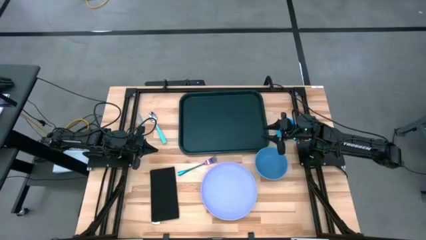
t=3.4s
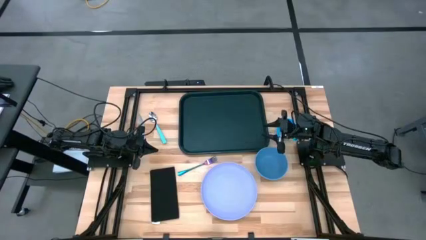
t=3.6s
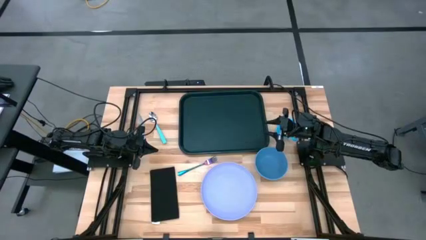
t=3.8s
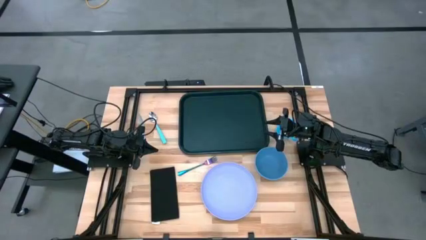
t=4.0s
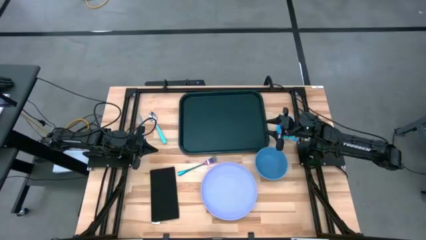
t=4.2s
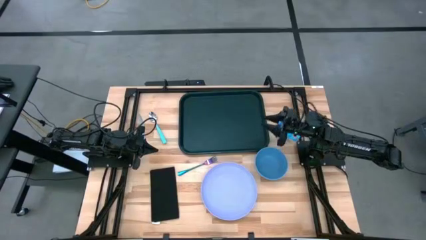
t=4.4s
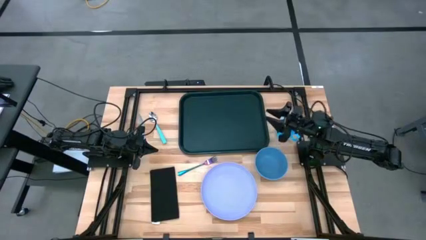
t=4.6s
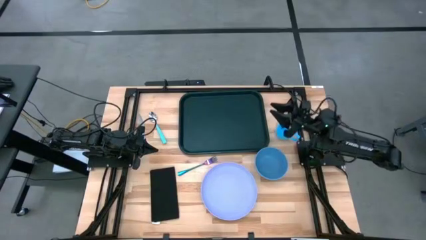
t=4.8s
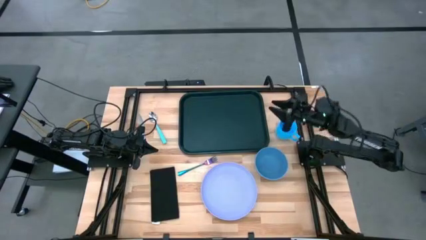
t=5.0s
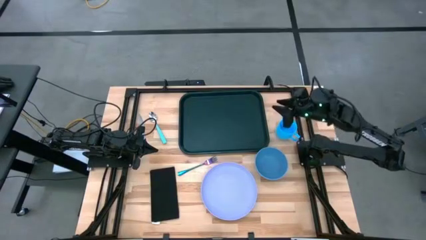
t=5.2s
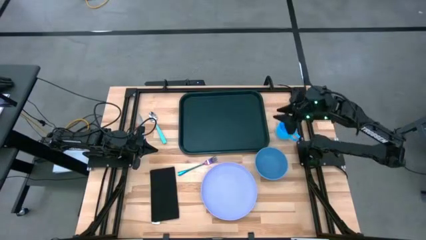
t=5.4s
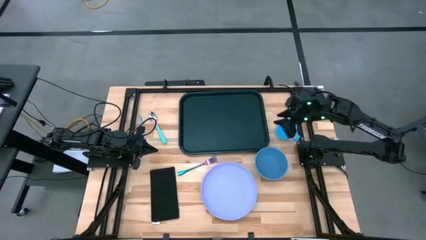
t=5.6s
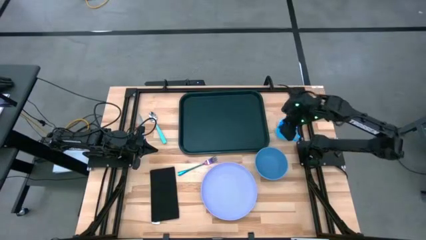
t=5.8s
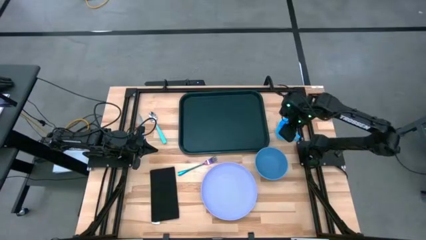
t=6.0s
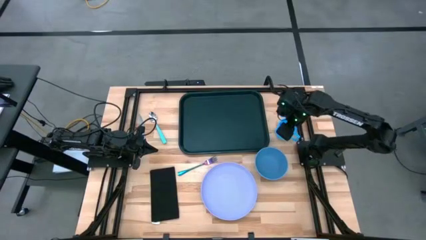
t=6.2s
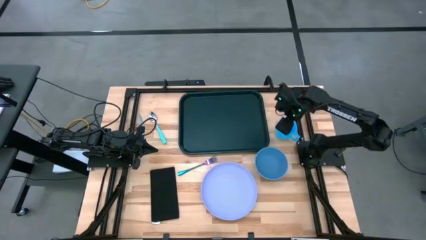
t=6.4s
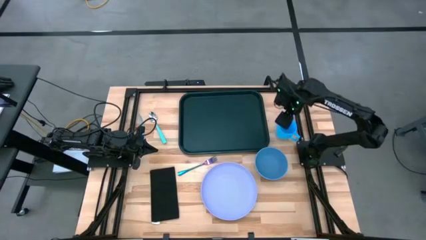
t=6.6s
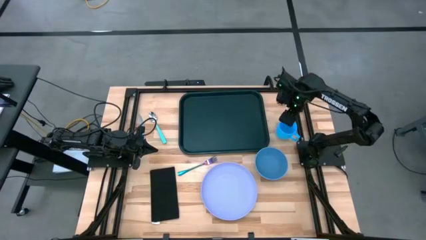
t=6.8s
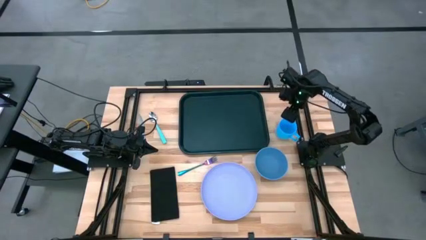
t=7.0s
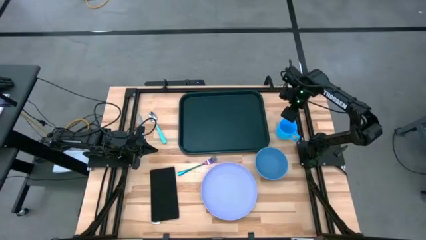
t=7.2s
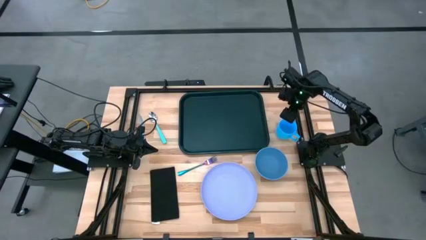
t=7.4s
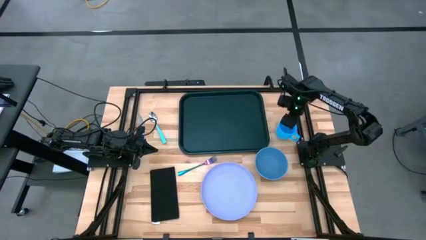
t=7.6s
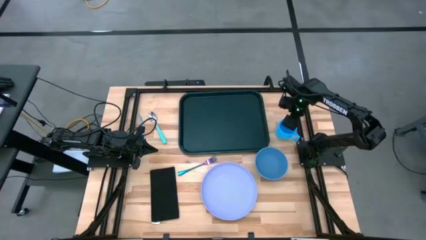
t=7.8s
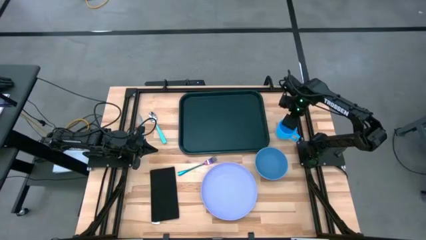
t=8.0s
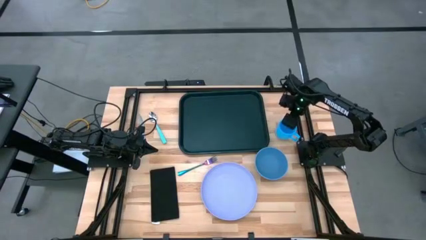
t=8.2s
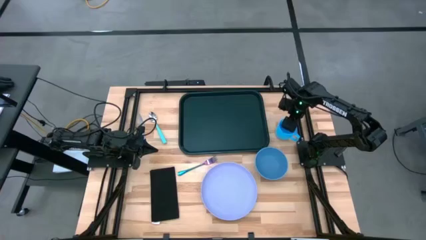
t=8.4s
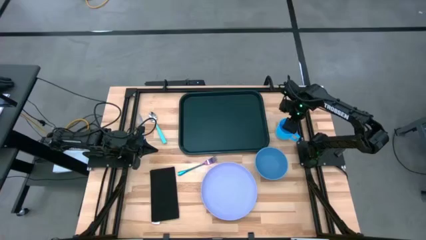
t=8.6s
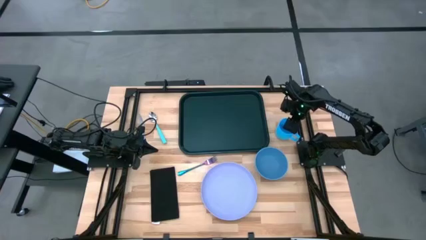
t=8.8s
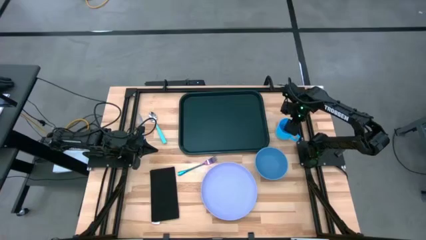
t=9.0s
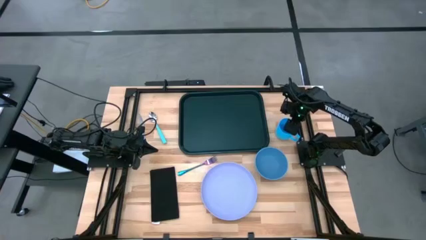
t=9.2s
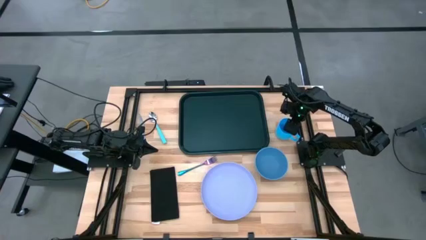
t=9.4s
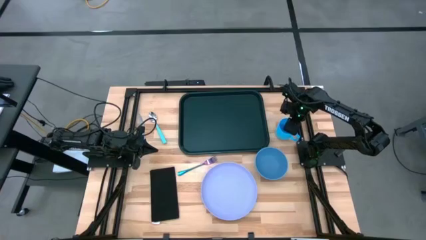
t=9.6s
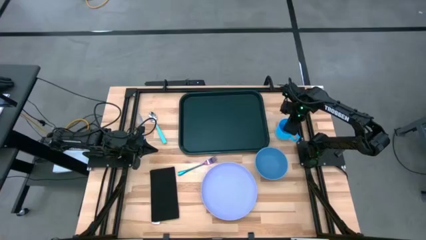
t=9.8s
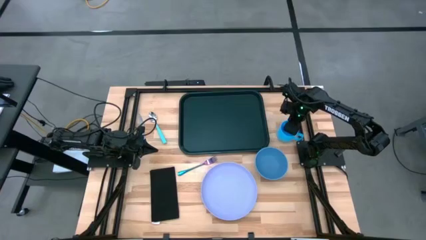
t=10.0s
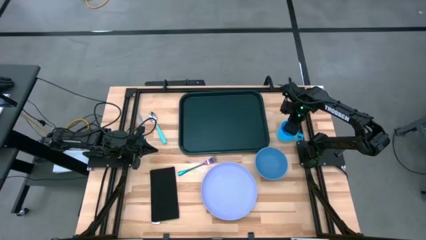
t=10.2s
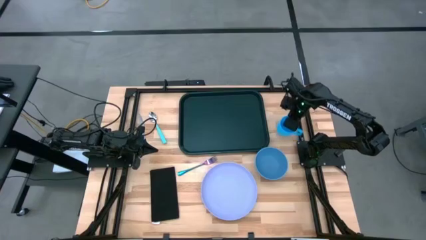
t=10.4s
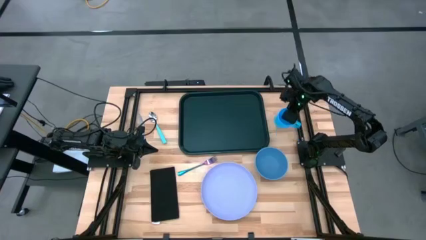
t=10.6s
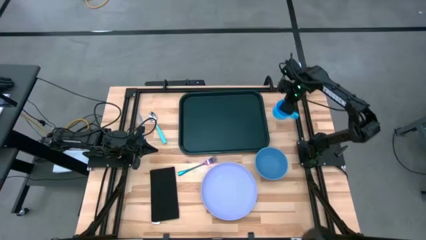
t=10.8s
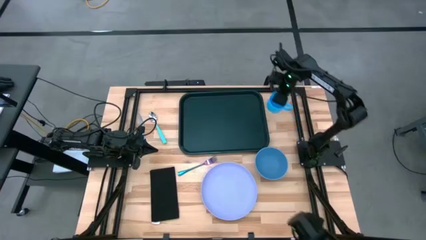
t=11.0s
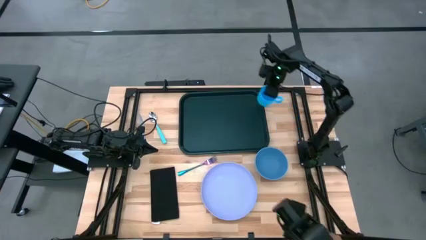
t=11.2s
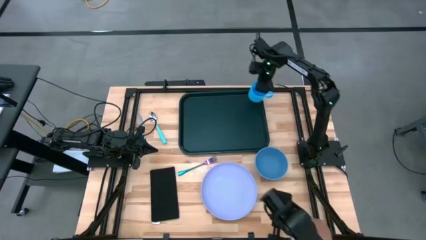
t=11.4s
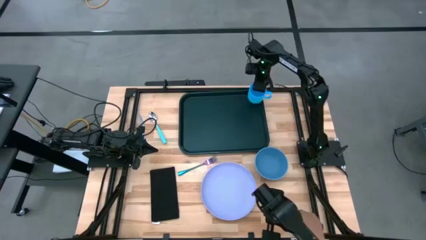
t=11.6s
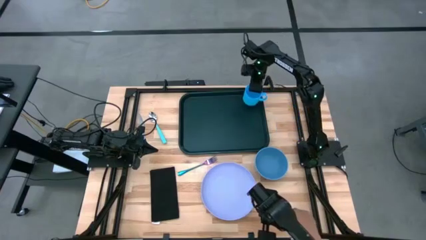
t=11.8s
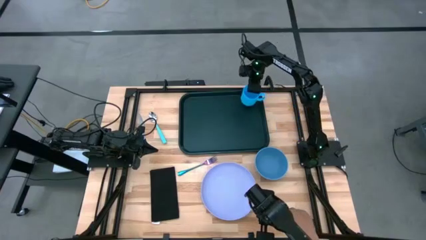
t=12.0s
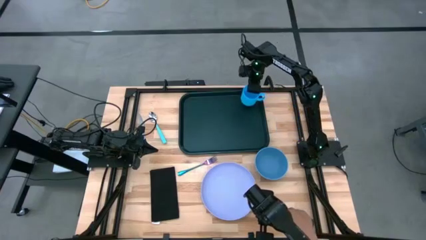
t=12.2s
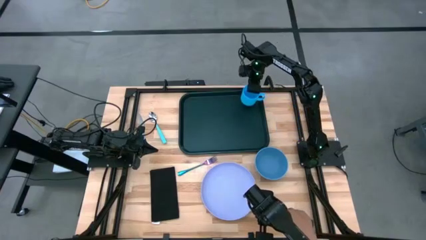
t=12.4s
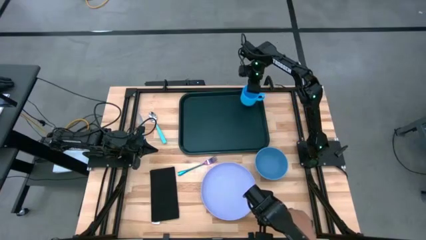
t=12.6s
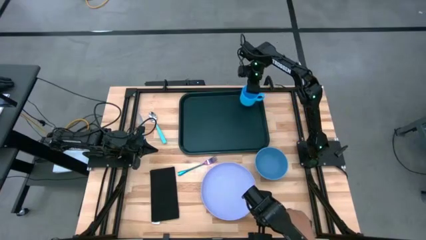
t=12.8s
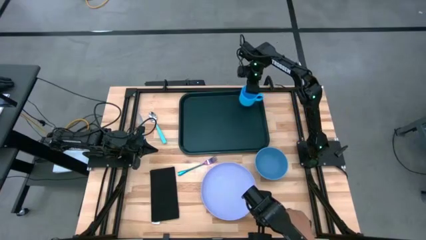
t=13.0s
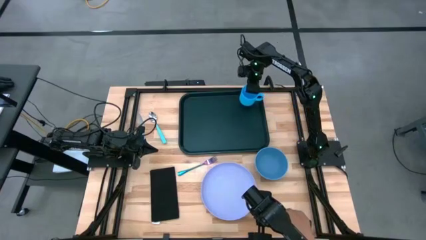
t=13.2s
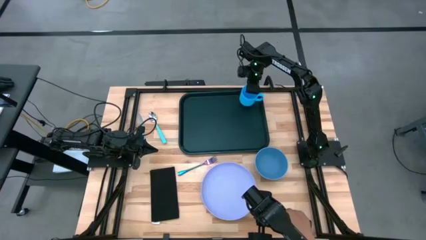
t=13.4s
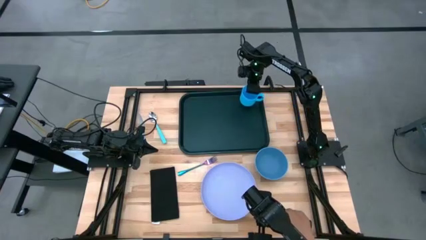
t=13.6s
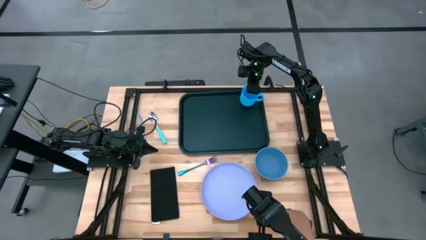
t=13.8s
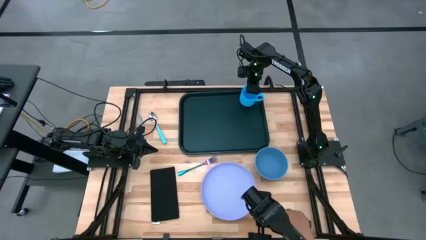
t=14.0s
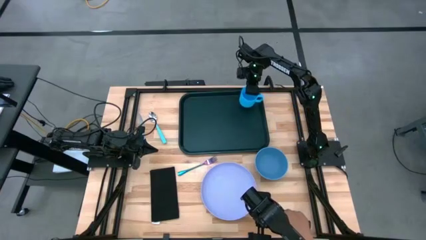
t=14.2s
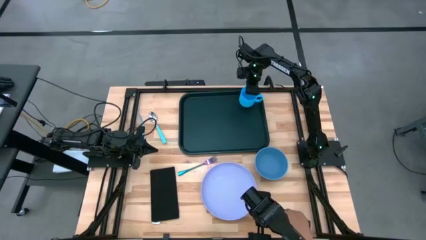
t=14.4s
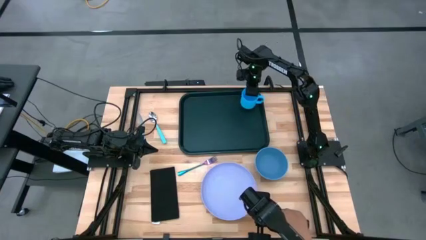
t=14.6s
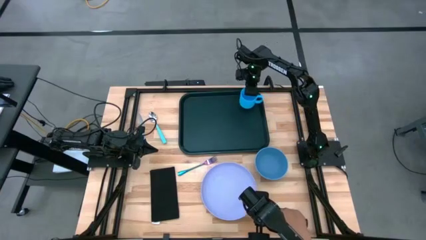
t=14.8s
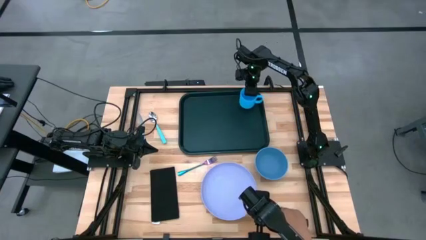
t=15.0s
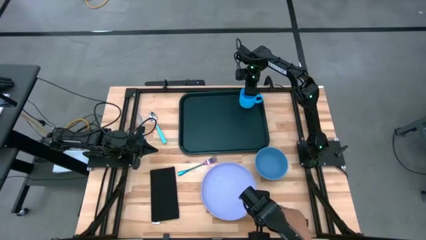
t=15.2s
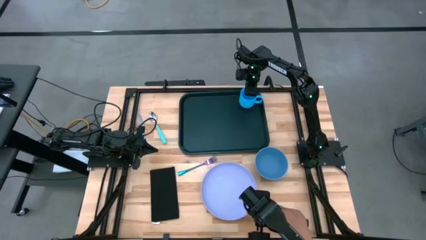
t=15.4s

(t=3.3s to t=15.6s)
Task: Set up tray
Put the blue cup on the black serving tray
